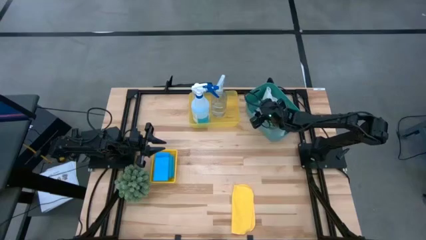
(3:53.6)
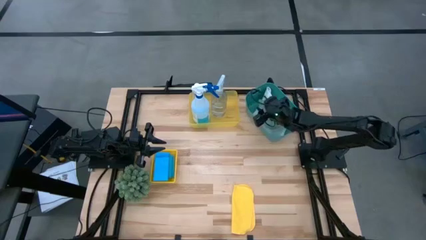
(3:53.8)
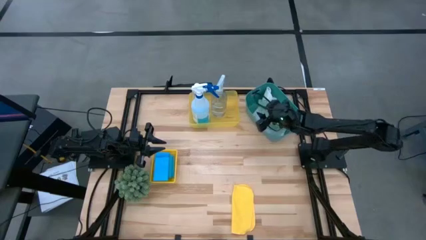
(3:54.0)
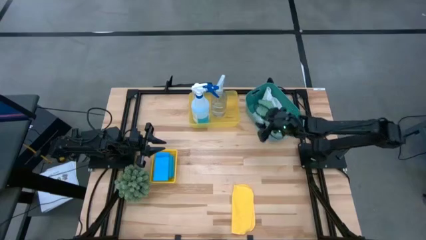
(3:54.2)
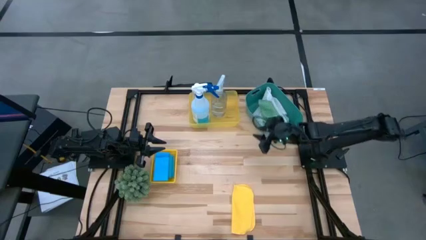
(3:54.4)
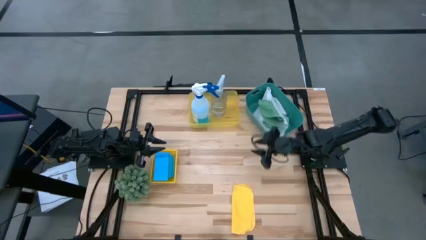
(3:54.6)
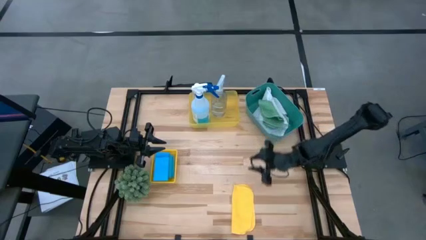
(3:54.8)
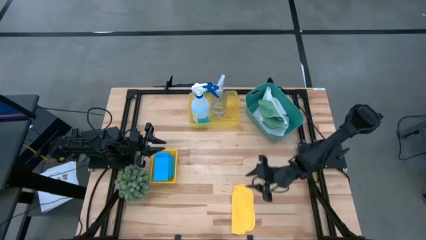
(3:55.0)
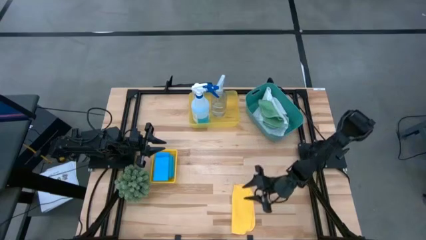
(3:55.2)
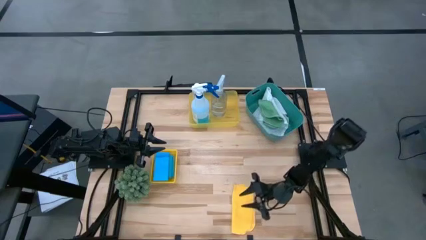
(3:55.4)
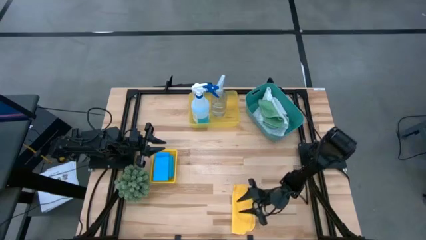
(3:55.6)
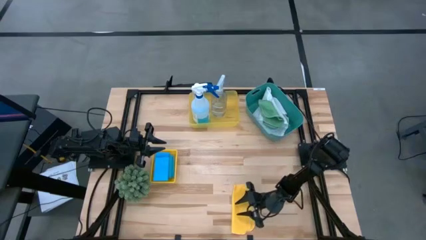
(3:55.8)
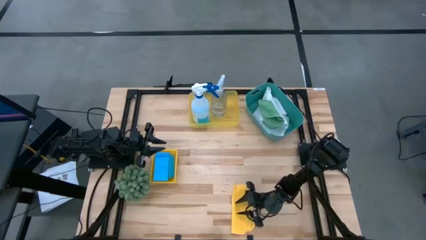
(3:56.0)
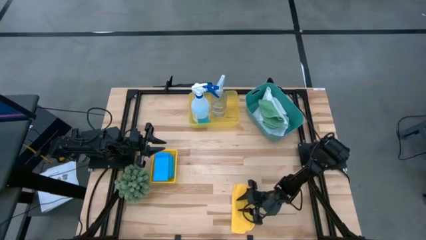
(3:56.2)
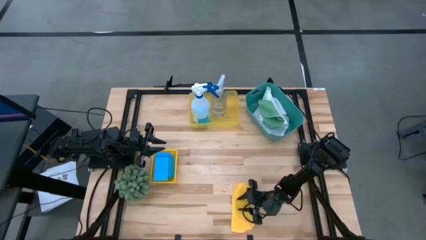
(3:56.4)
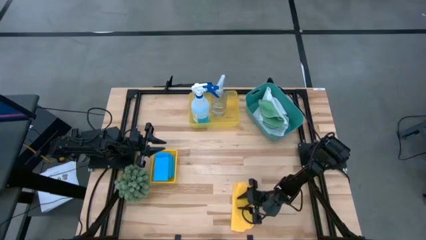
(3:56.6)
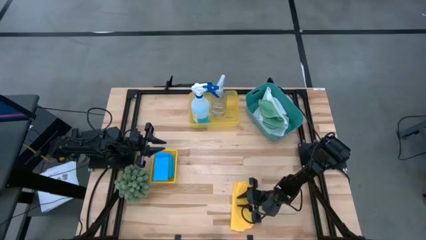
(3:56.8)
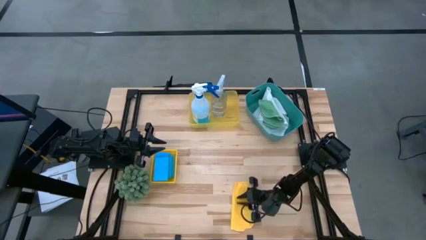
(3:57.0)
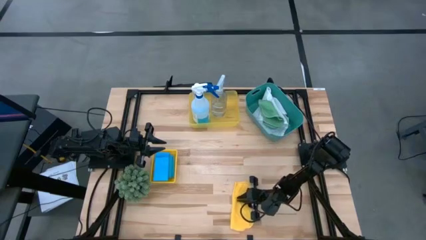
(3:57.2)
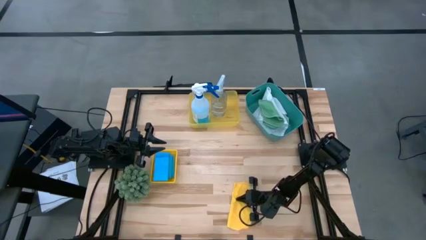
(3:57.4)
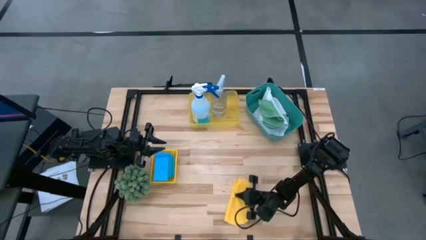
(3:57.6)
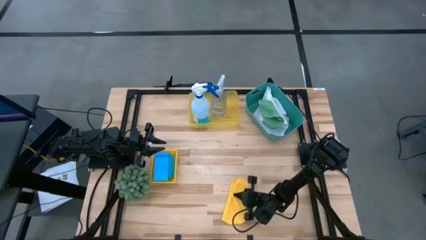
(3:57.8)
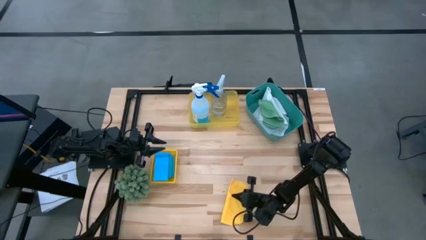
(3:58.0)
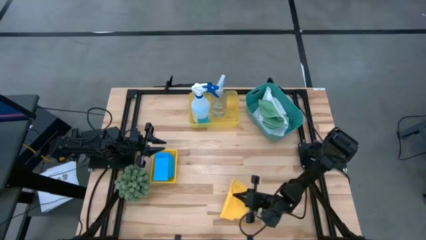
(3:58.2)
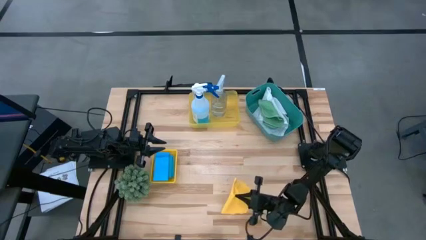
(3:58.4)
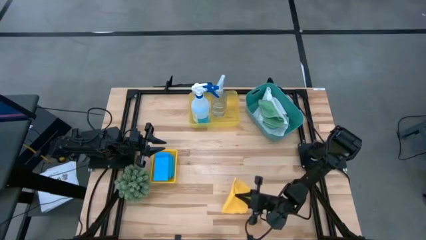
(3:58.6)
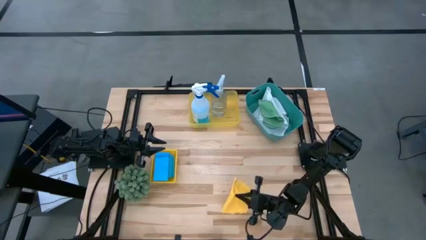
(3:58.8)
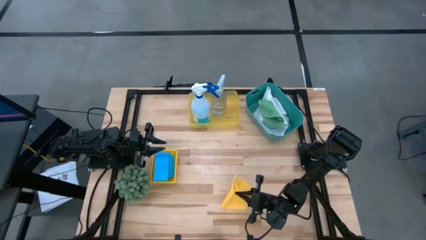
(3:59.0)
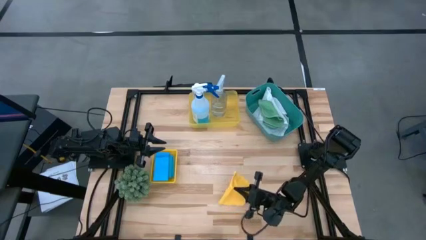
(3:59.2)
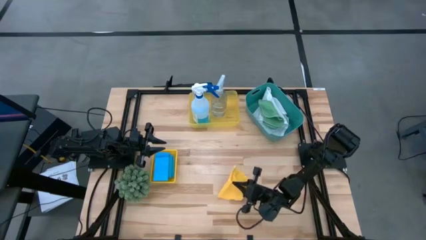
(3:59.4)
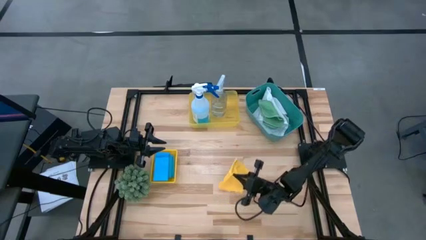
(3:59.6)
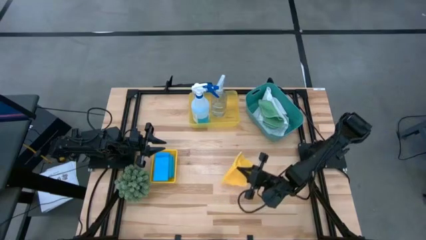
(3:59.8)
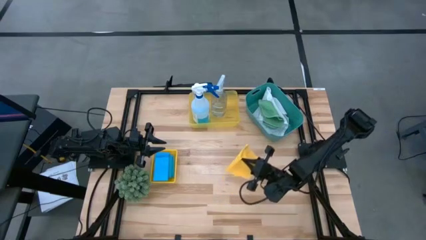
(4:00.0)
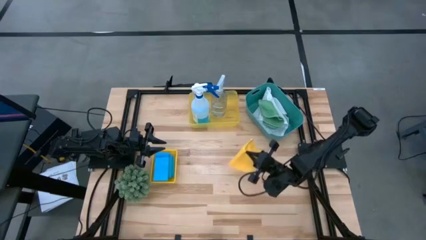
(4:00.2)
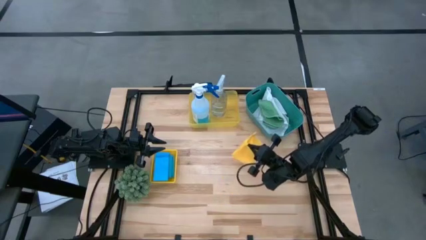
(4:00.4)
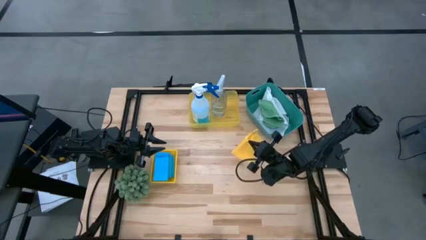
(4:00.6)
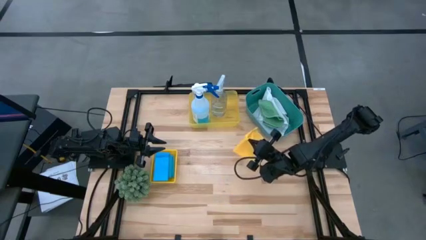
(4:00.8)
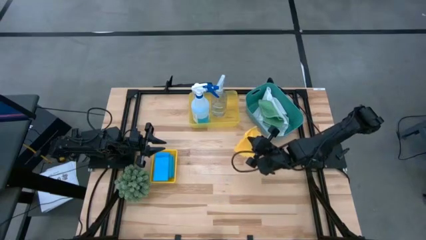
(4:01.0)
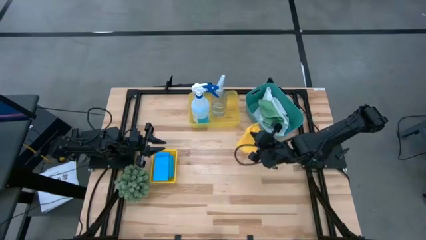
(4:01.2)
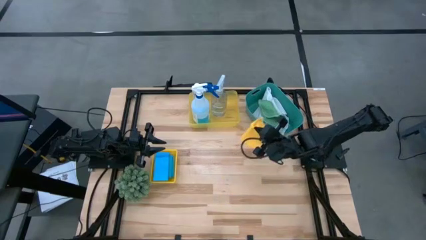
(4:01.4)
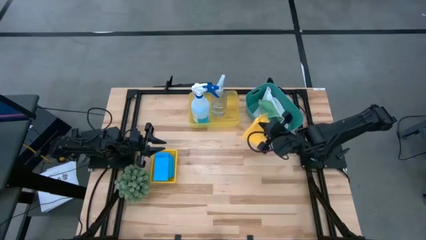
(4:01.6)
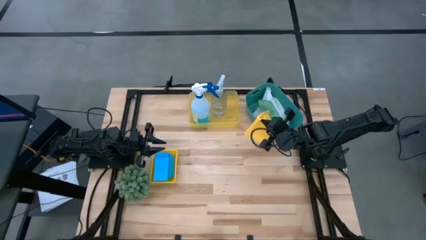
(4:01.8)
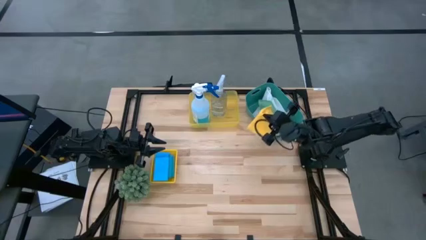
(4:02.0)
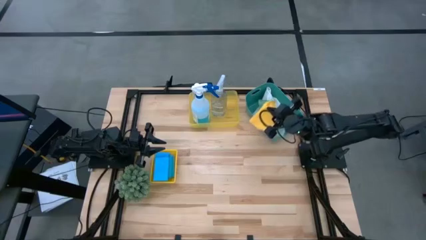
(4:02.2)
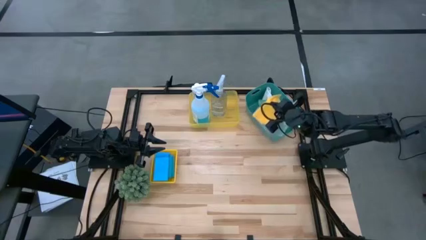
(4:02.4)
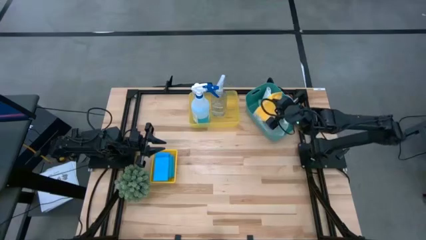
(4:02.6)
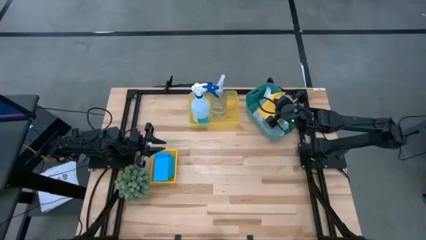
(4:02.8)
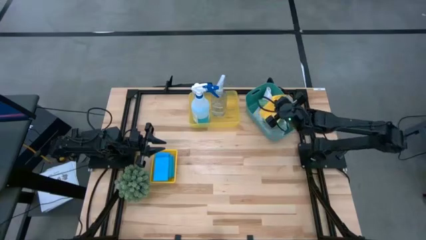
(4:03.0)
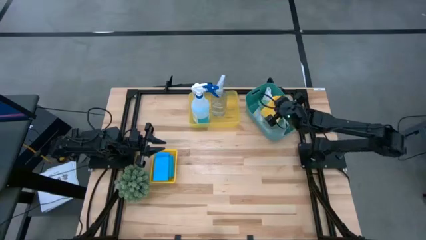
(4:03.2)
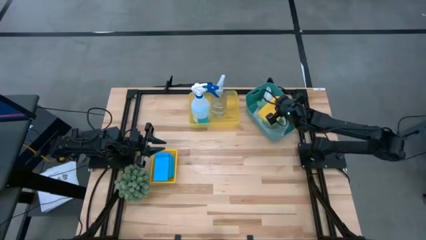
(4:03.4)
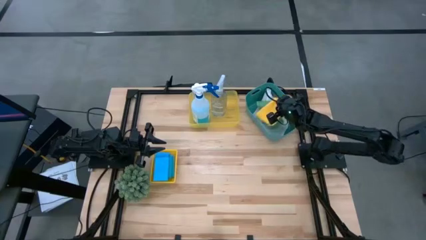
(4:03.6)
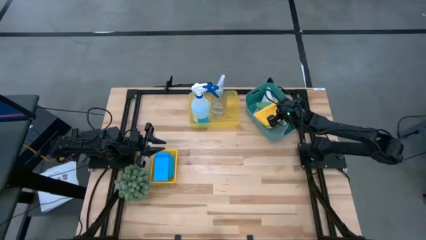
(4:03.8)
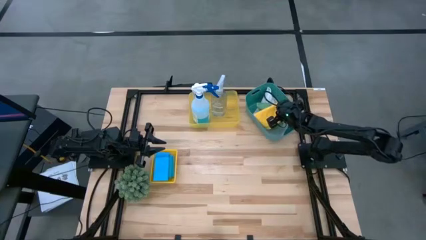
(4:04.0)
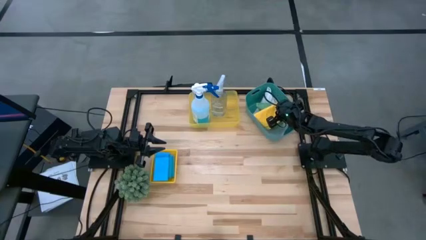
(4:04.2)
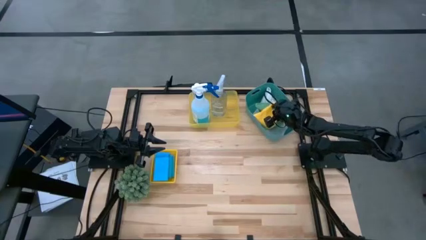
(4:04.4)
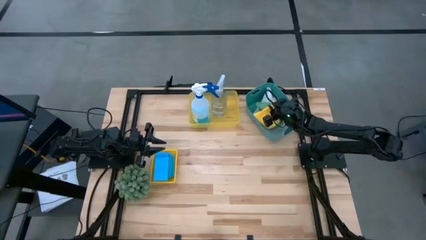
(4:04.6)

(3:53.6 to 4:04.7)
Task: Pick & Place Kitchen Items
Put the yellow microfiber cloth into the green bin

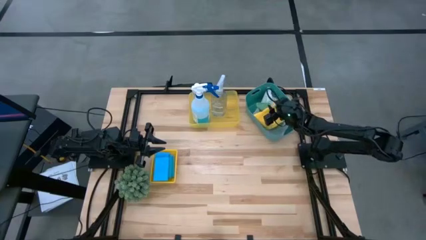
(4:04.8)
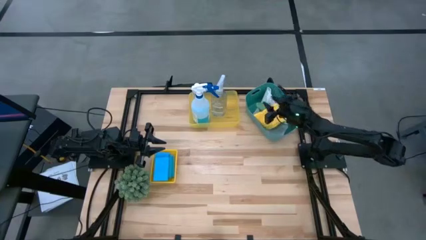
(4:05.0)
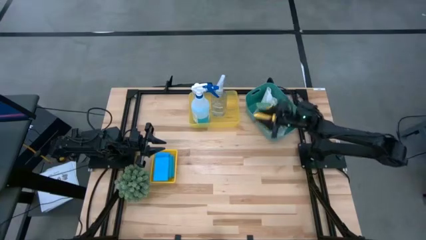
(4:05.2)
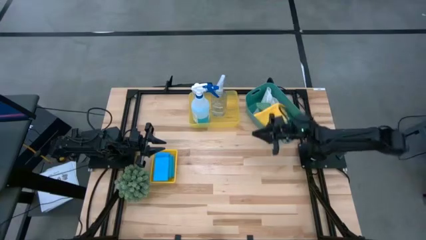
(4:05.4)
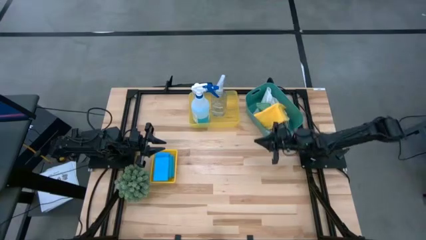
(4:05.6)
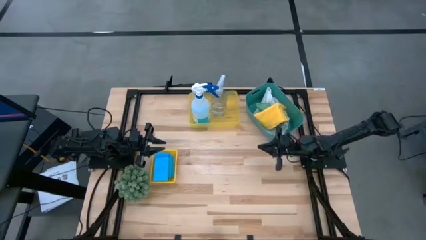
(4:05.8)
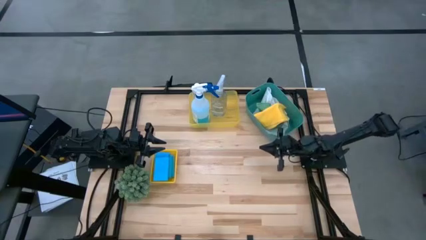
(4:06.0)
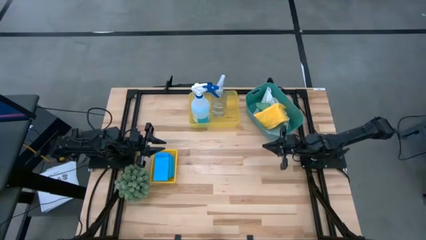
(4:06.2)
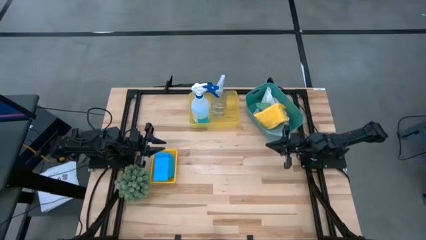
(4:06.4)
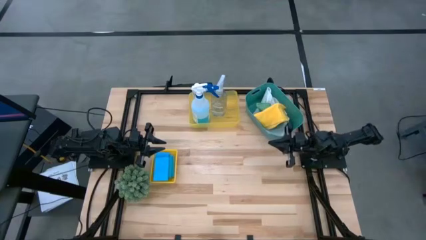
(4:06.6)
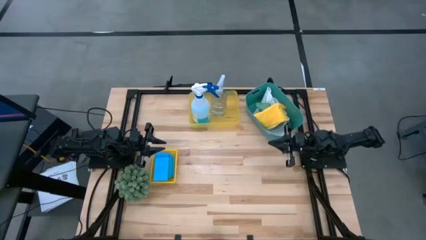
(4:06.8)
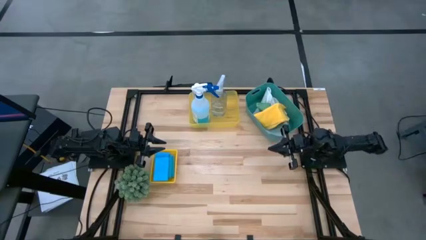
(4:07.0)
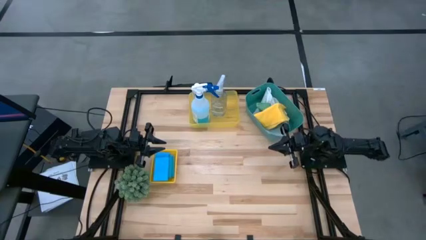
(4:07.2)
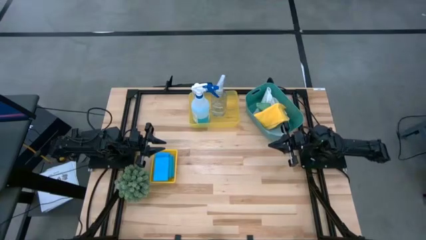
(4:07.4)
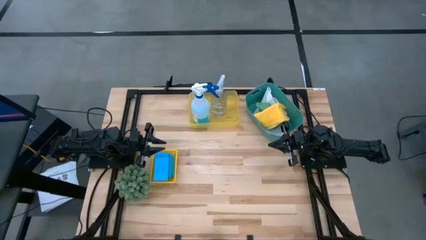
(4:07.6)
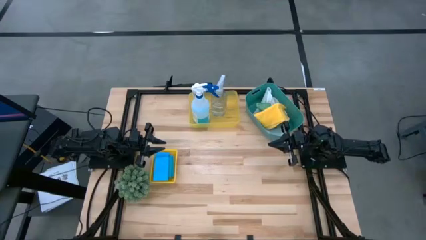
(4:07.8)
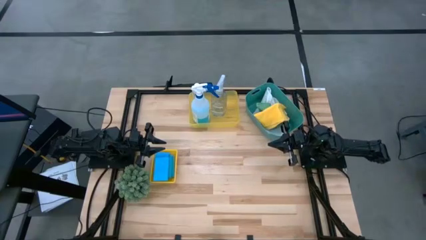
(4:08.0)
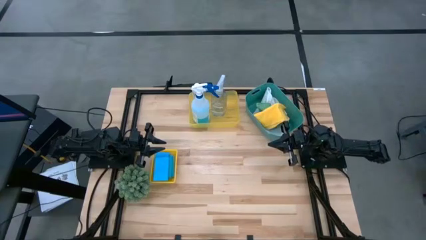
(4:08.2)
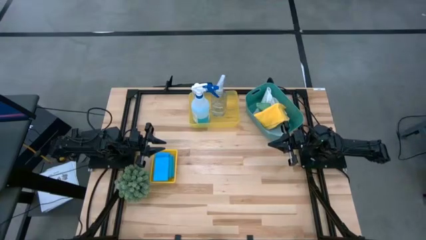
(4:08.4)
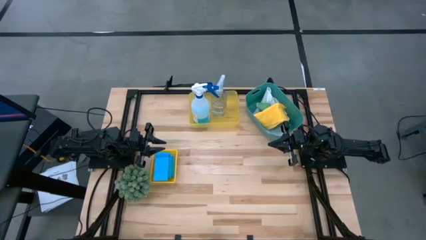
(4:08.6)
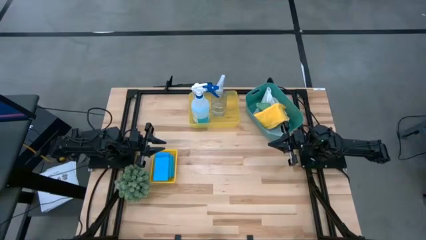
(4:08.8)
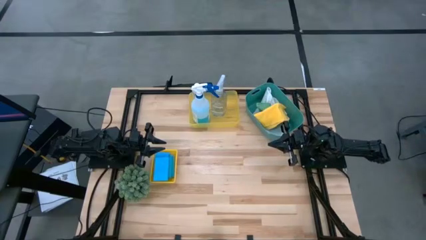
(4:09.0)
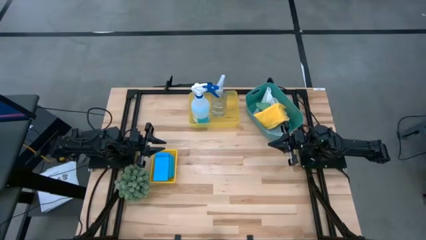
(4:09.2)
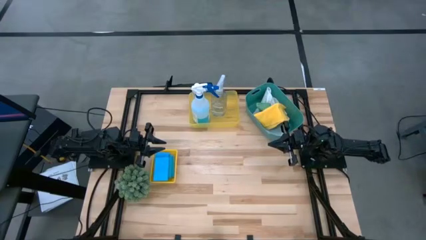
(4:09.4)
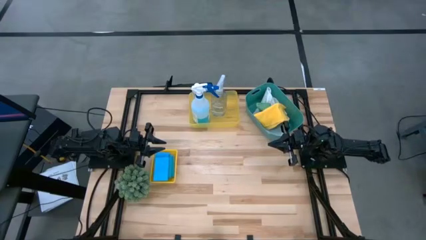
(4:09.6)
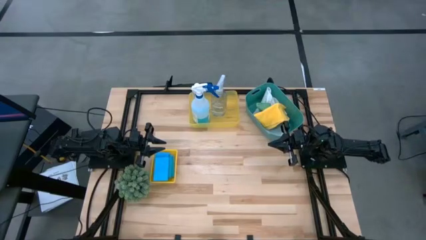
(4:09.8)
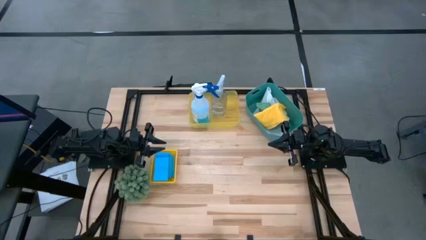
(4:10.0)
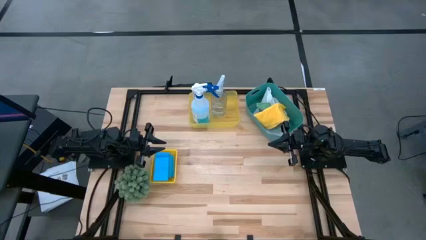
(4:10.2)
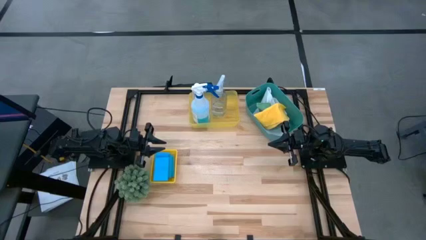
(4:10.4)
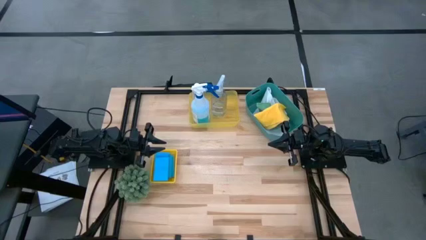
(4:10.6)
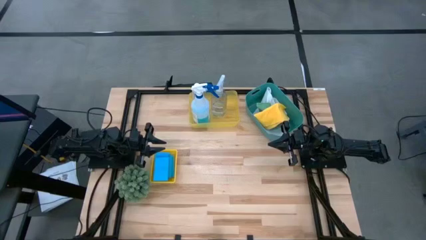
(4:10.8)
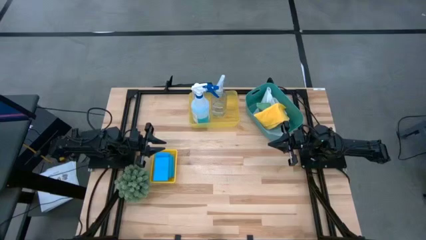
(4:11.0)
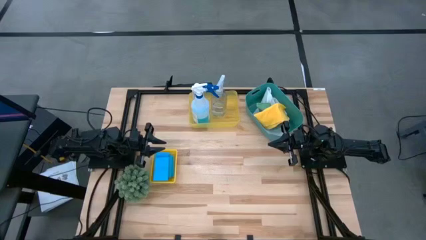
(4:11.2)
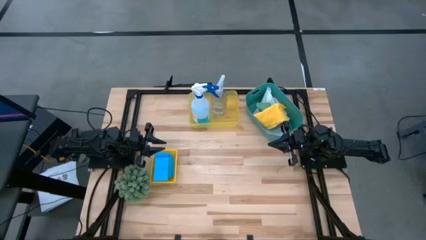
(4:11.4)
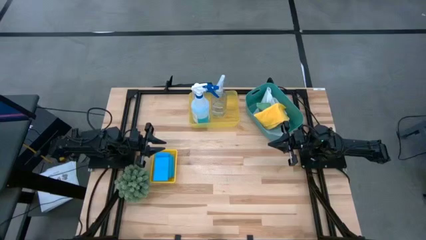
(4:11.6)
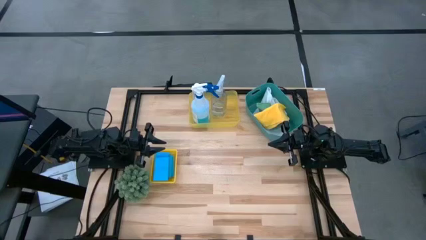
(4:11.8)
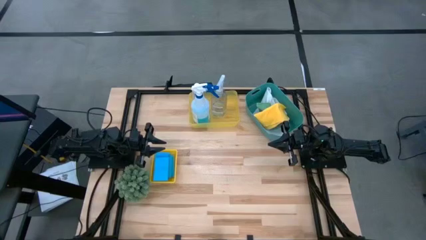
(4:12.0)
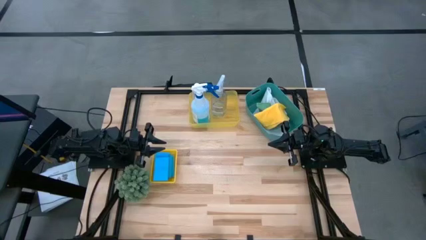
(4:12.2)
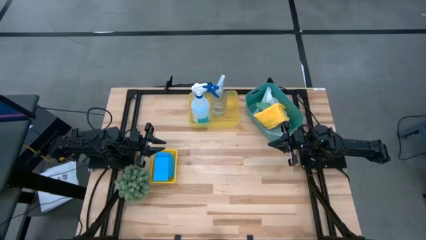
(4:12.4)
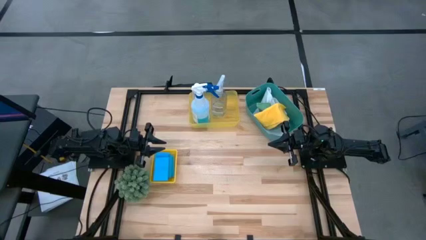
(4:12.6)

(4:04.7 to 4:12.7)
Return to Home Position
